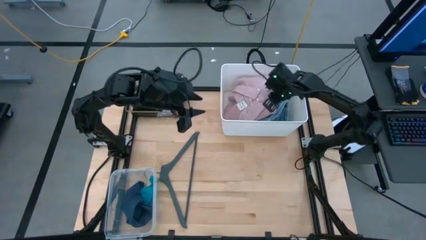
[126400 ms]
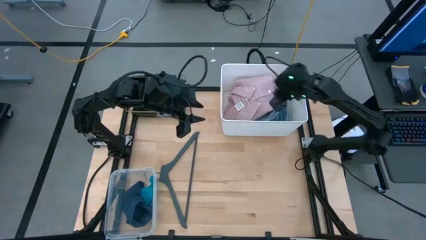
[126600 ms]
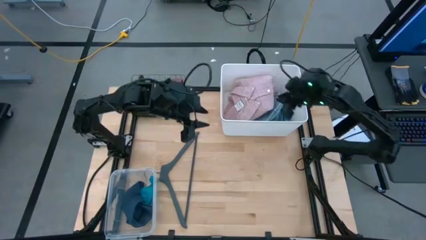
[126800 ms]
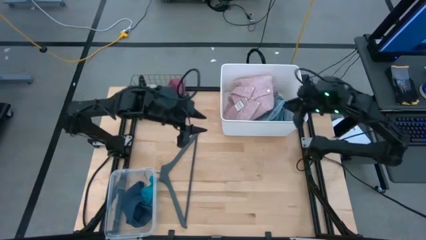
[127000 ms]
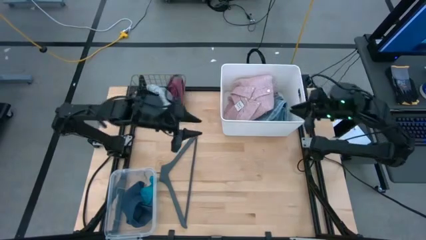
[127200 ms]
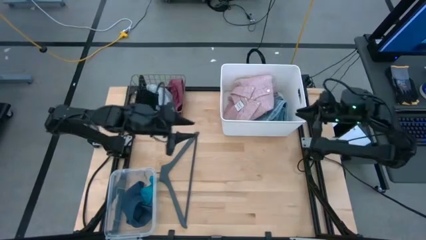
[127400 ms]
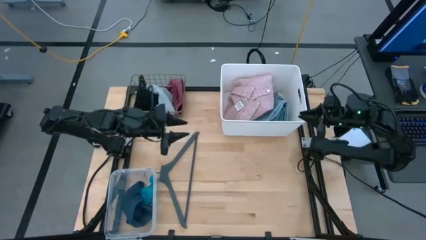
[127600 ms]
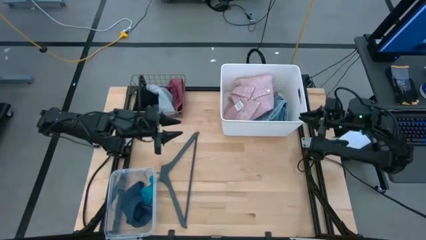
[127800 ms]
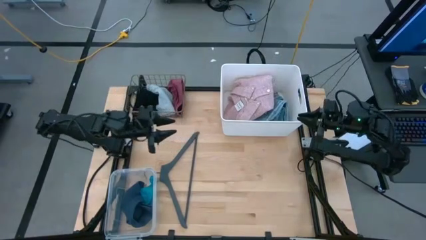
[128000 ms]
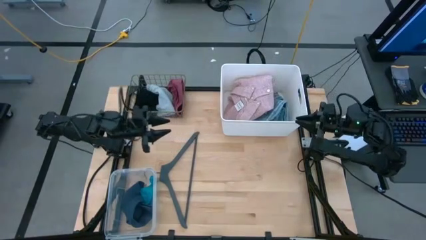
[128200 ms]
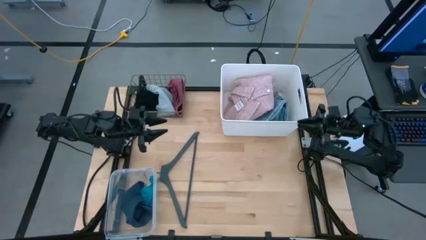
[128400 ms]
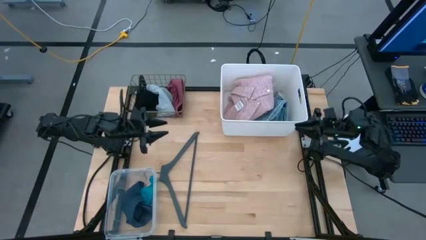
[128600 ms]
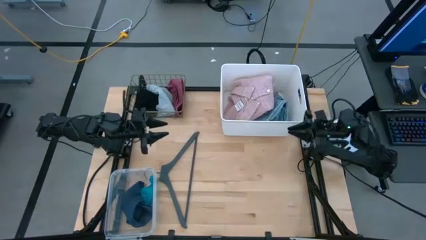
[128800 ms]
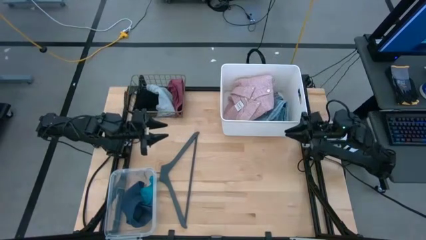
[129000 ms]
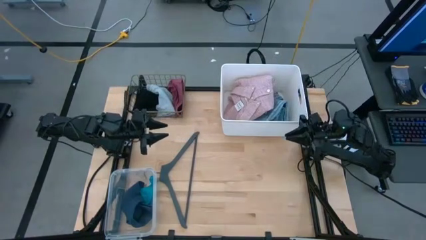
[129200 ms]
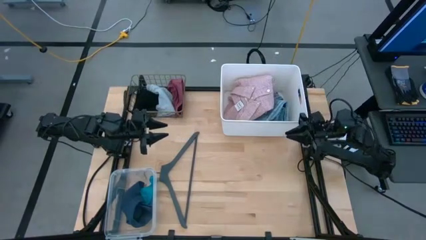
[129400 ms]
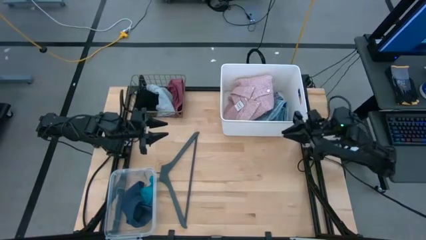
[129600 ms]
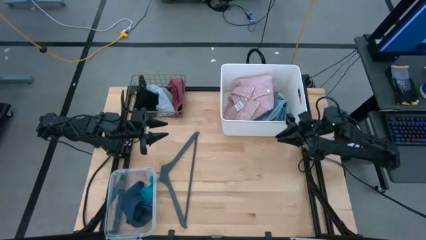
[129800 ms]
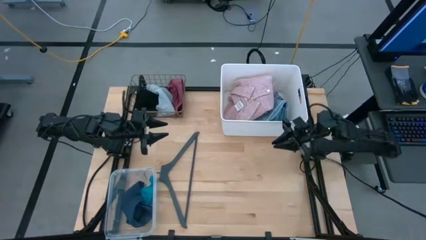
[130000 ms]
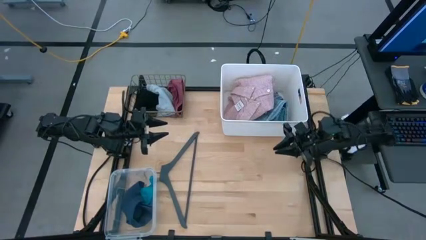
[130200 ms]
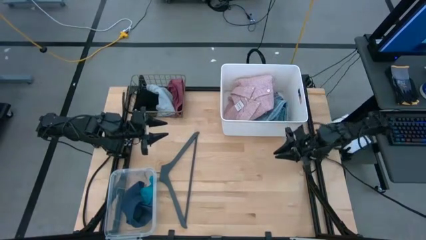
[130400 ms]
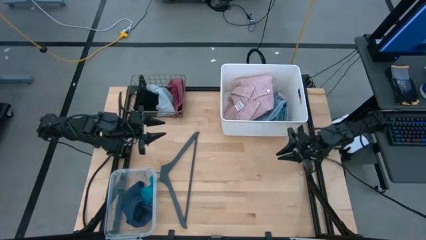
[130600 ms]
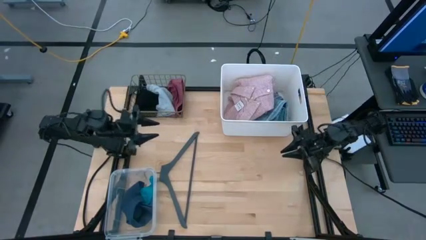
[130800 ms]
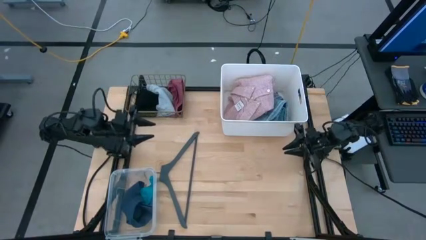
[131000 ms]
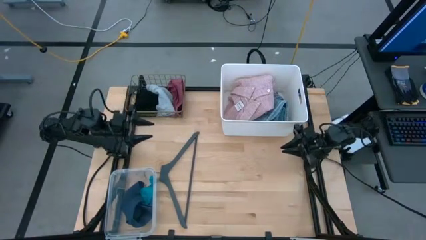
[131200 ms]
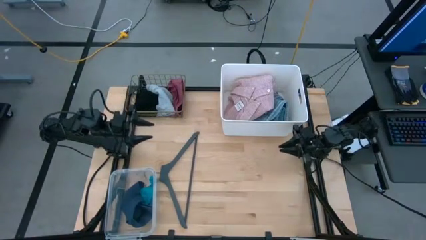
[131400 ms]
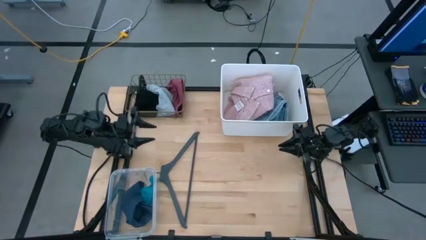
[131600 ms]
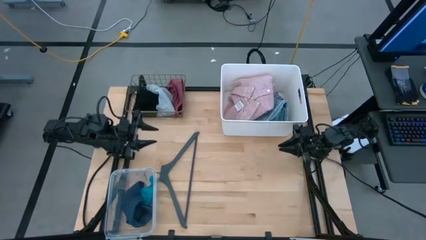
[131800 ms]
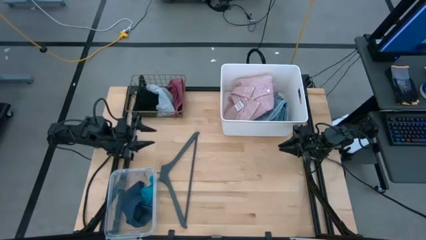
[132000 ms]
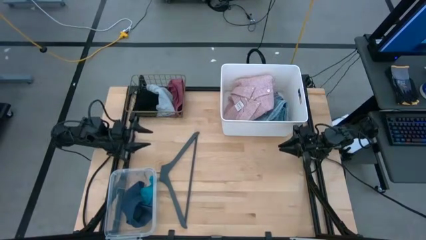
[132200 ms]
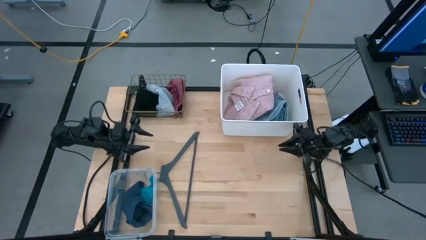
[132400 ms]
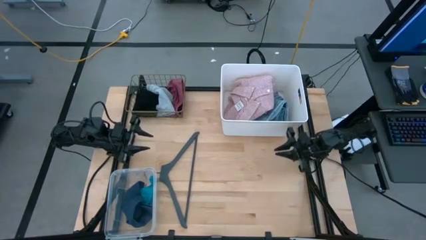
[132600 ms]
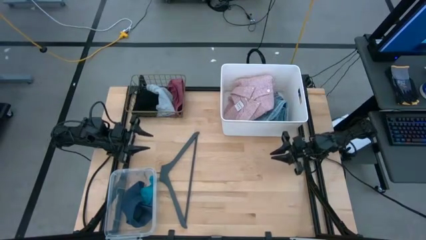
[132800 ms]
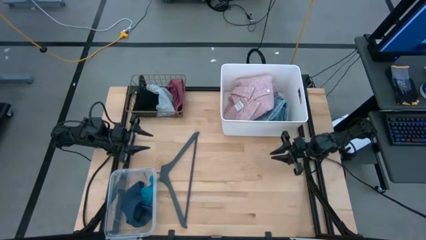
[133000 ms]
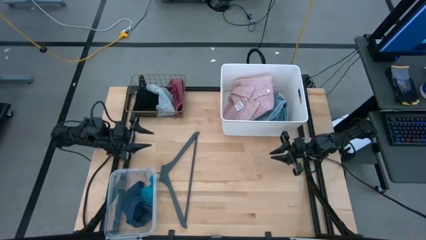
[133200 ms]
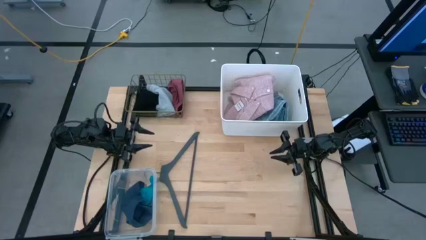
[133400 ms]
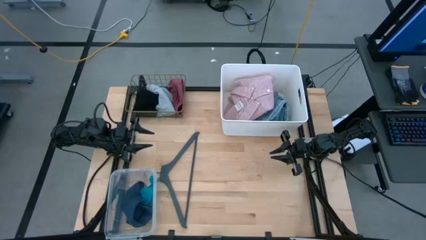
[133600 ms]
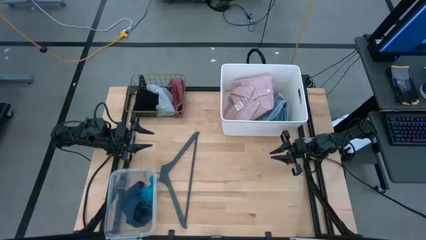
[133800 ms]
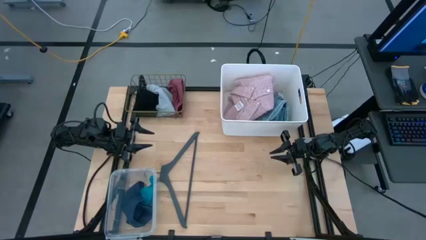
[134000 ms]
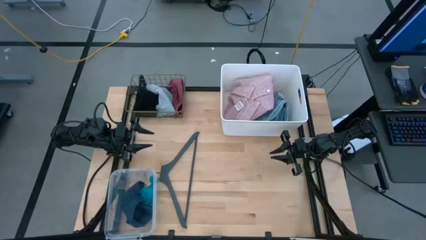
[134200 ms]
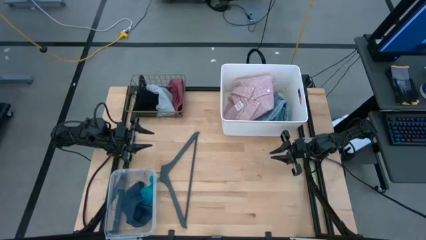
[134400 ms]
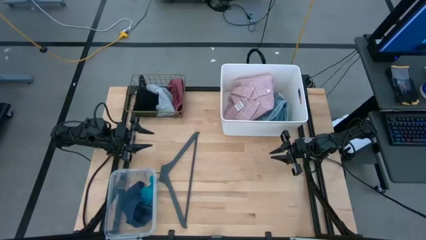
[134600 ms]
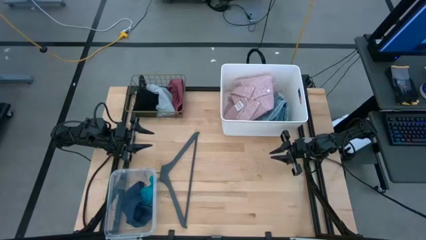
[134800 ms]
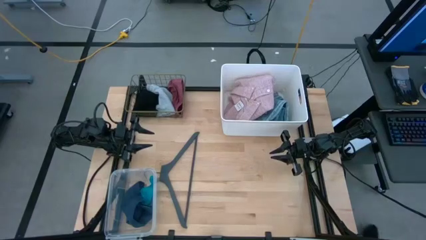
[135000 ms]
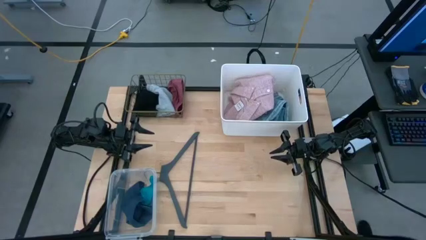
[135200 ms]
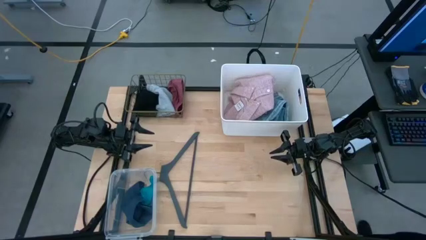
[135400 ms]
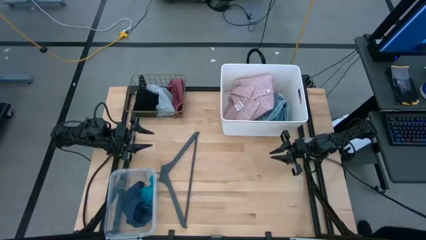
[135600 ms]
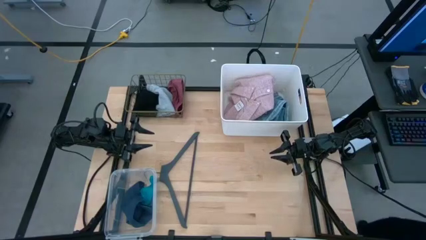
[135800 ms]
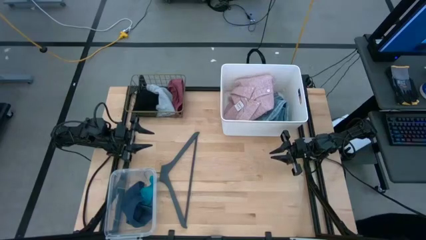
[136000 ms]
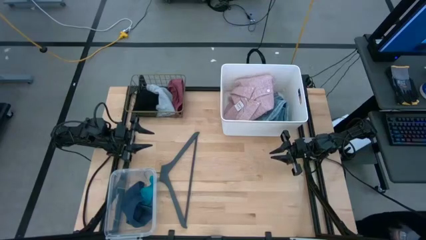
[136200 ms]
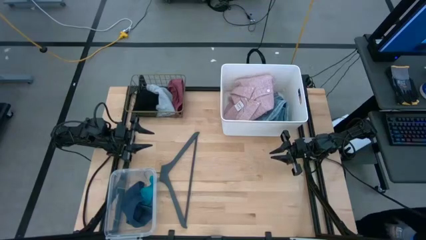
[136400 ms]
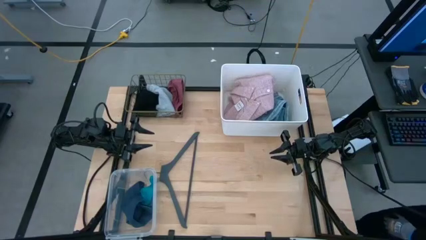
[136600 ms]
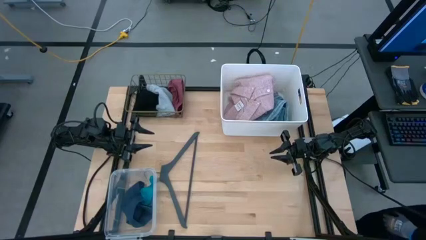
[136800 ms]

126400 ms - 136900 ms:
Task: Pick & Place Cloths
Return to Home Position
